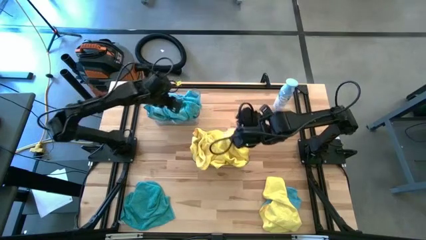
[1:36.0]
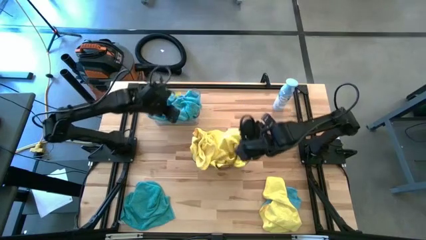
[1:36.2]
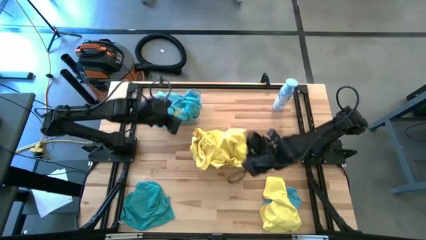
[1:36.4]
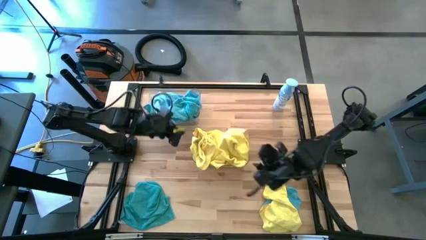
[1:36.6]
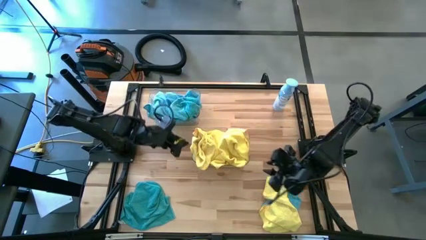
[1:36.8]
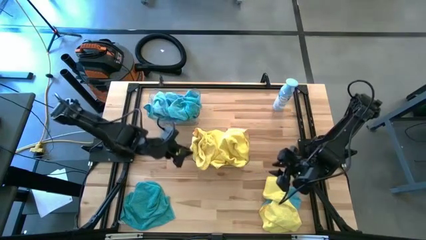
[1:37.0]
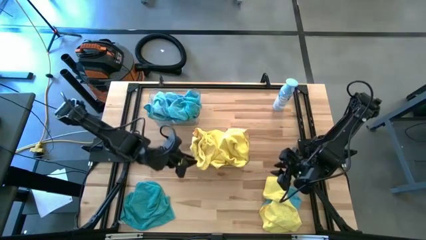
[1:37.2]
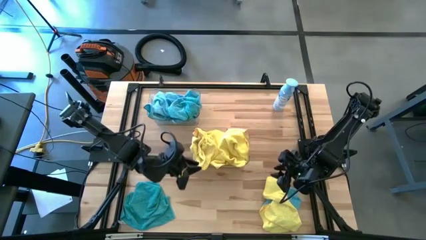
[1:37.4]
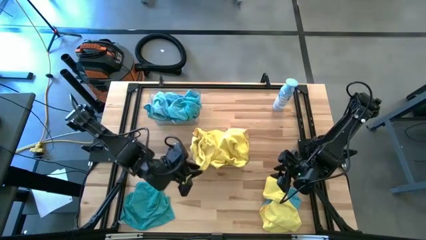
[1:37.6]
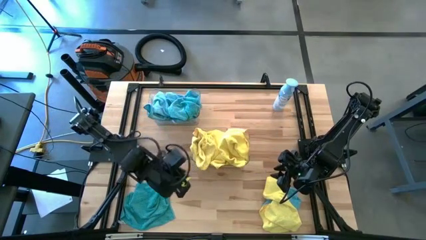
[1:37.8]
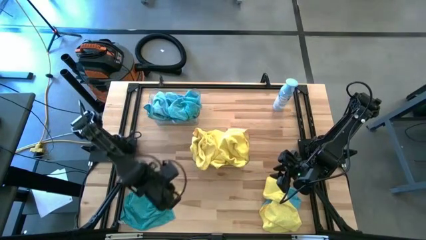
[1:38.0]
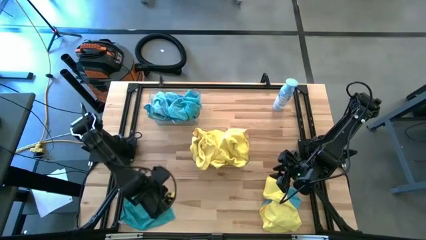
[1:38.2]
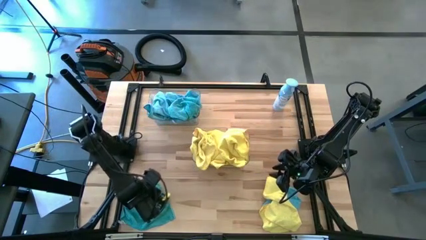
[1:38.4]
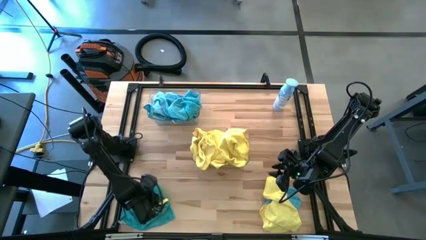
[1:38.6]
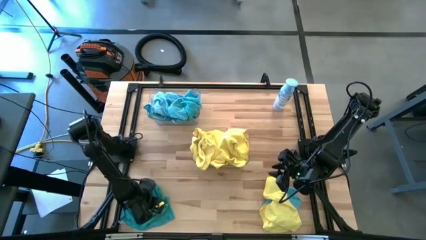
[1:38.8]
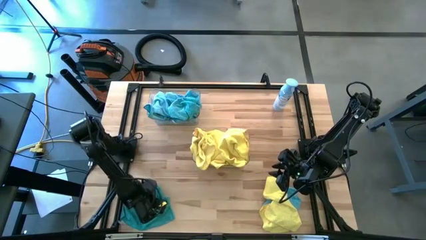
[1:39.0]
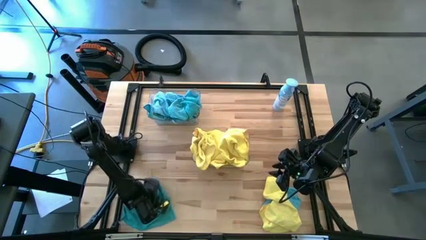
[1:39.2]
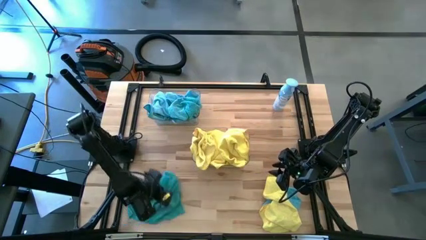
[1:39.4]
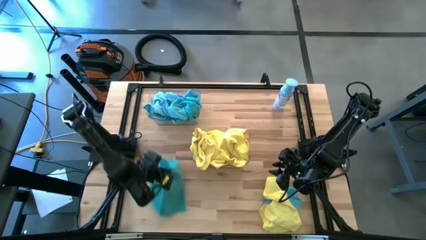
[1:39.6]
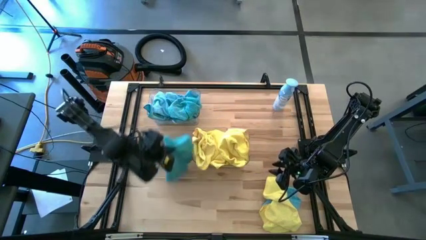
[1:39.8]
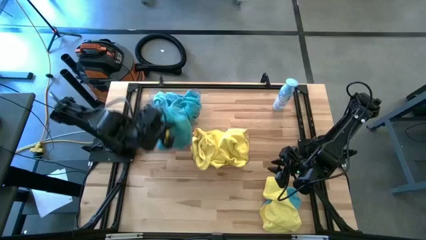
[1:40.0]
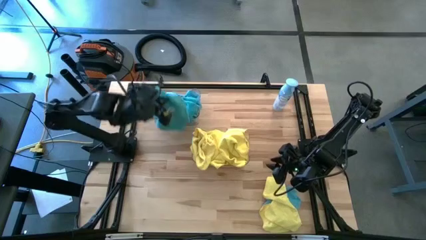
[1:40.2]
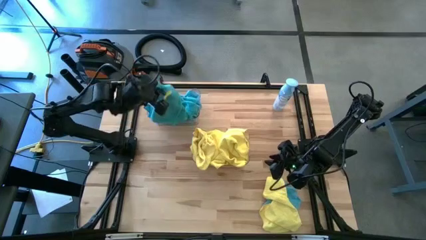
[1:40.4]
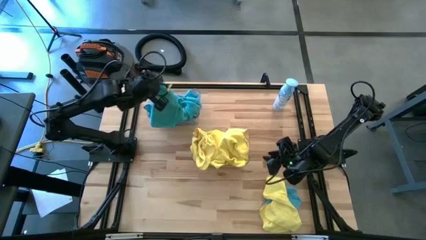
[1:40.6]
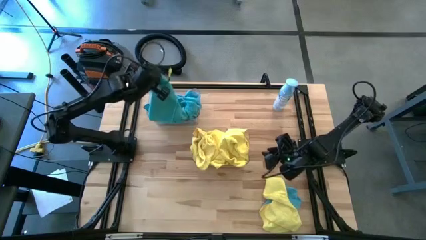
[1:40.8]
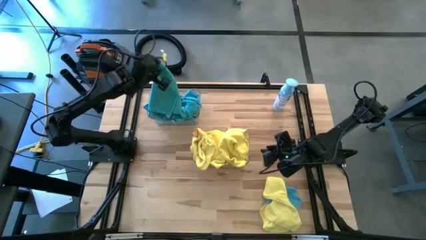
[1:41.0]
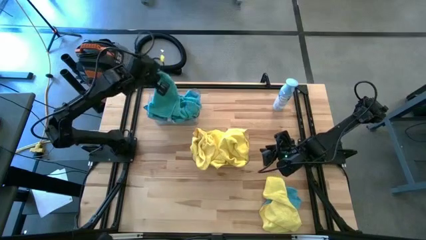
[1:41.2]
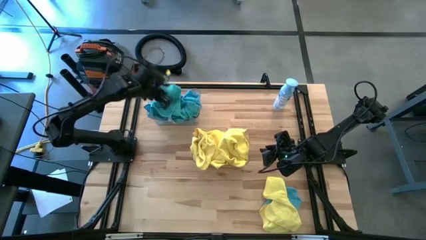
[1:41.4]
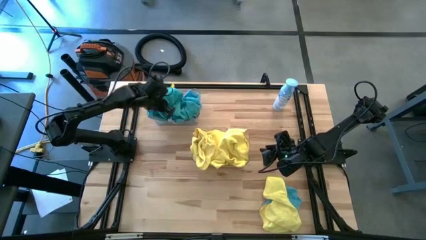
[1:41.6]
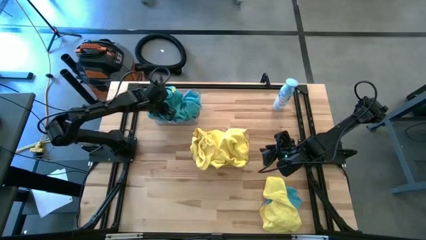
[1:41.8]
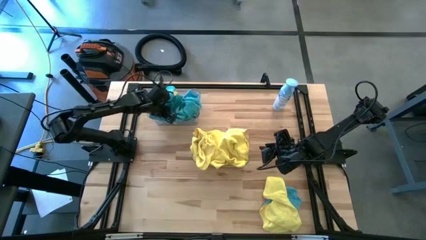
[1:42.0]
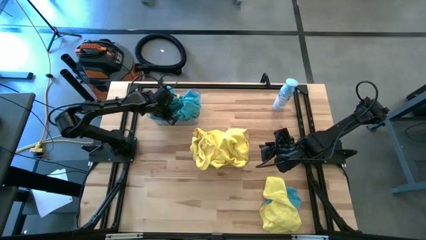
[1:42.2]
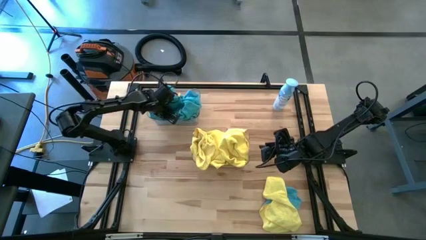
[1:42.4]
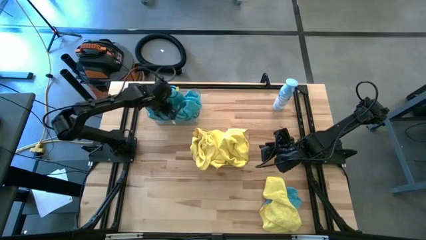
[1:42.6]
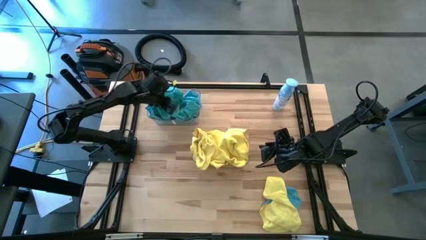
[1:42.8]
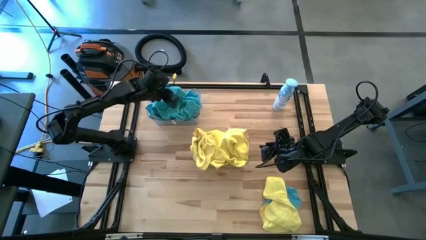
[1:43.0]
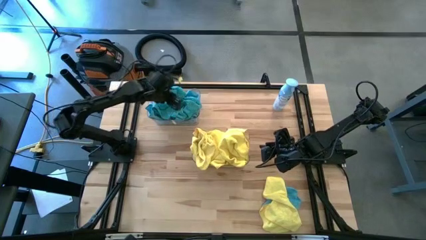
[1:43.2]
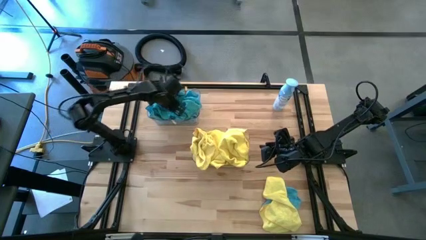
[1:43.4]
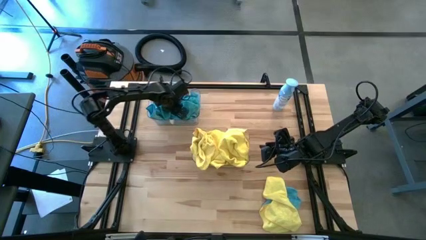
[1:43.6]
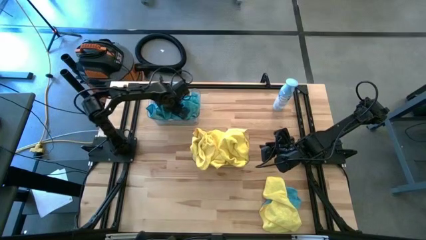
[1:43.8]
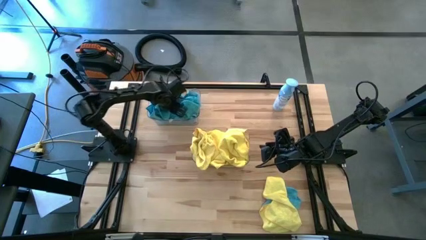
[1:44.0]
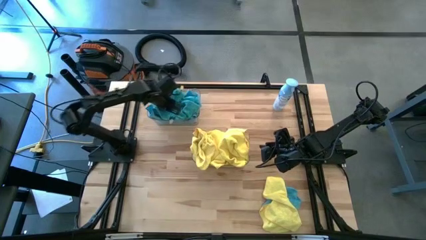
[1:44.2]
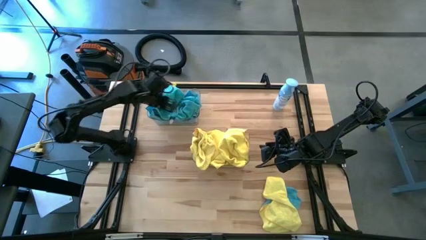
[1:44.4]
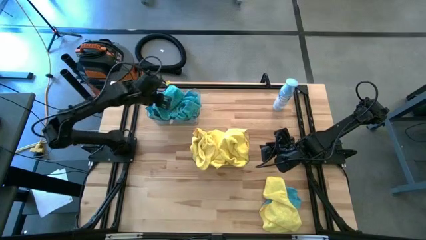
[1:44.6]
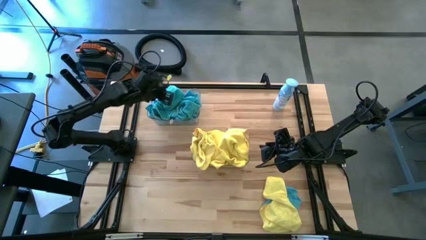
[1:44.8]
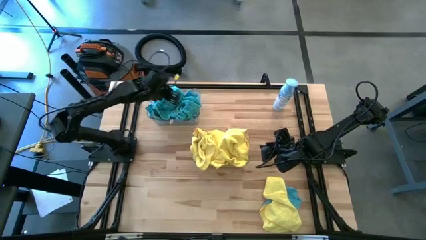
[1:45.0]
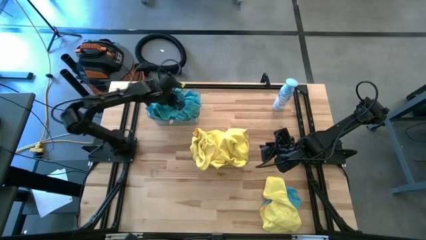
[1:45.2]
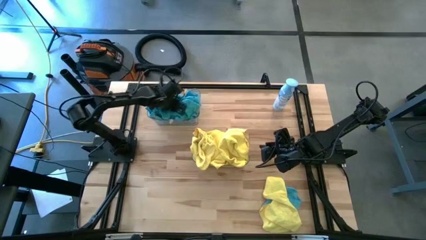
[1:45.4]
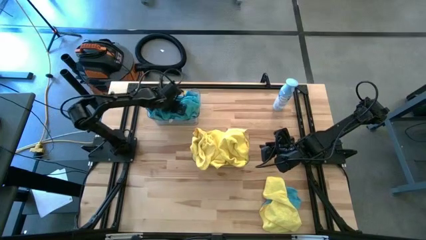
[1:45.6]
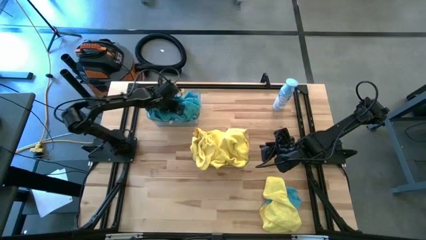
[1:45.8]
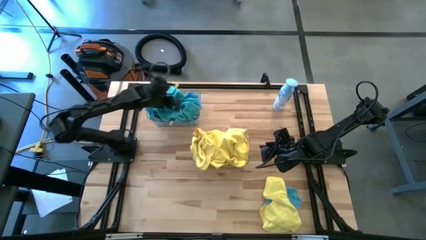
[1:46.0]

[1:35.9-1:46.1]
Task: Sort microfiber towel by color & place in baskets
Put the blue towel into the top transparent bin

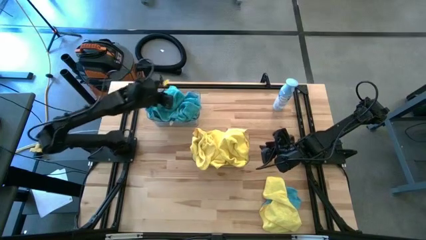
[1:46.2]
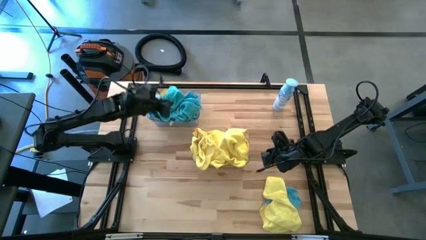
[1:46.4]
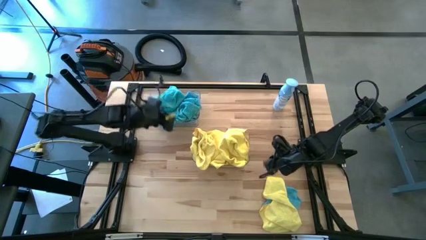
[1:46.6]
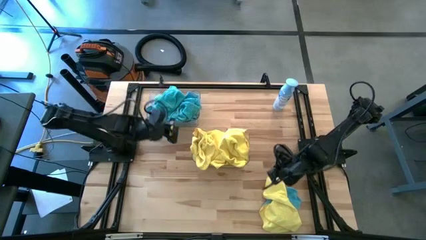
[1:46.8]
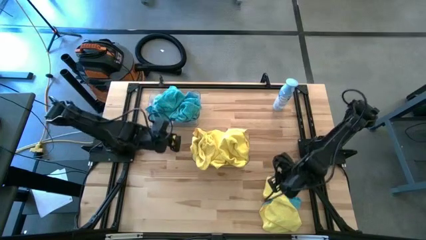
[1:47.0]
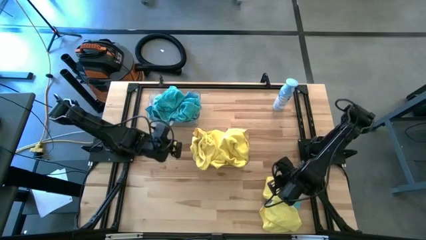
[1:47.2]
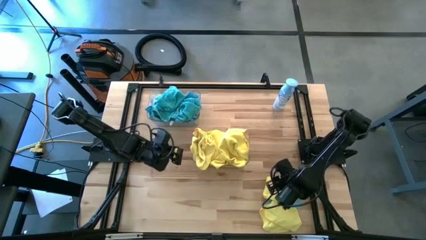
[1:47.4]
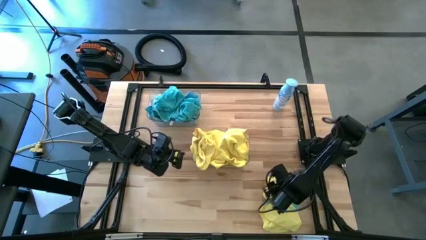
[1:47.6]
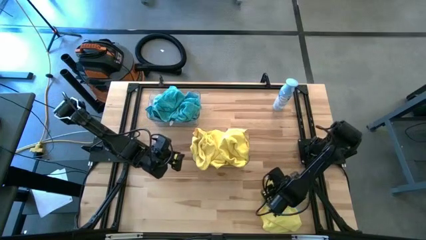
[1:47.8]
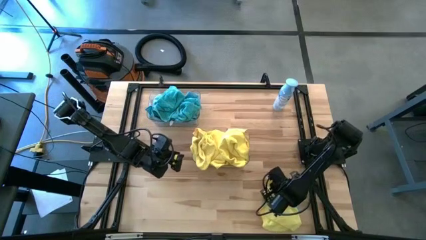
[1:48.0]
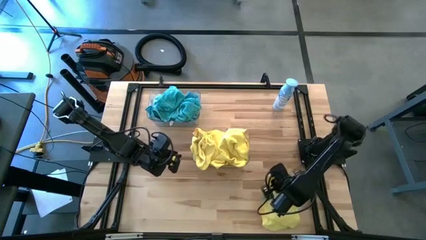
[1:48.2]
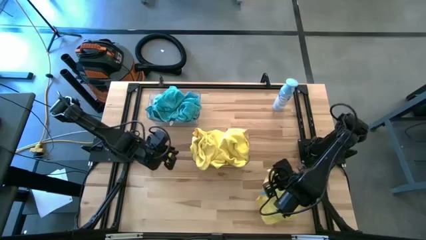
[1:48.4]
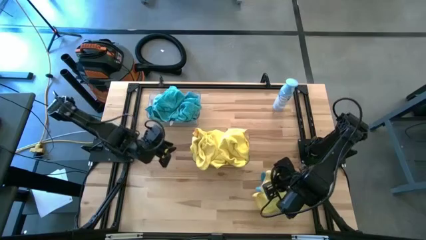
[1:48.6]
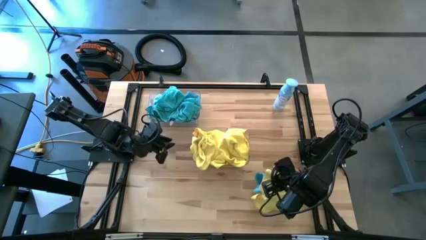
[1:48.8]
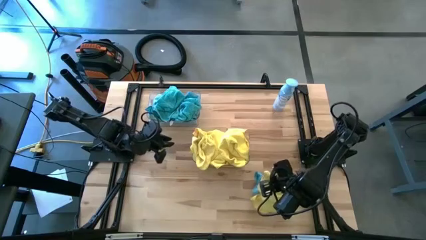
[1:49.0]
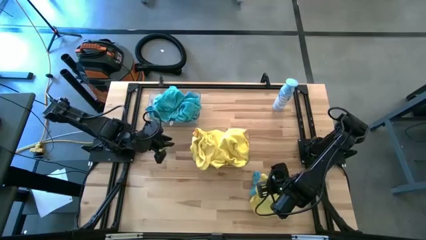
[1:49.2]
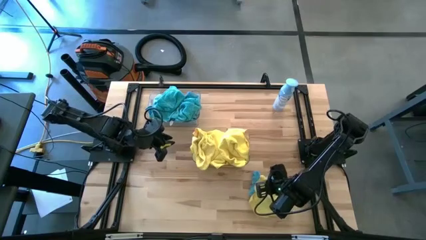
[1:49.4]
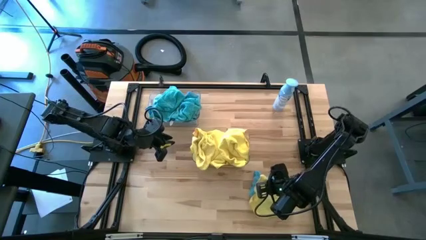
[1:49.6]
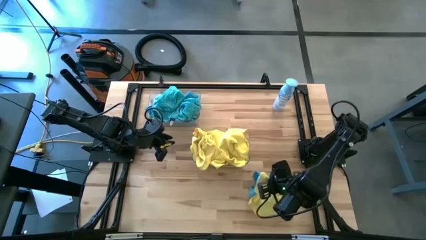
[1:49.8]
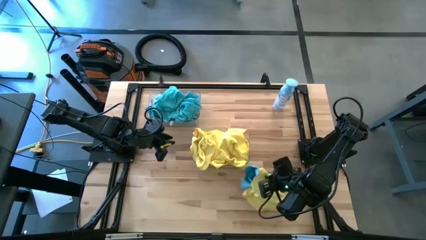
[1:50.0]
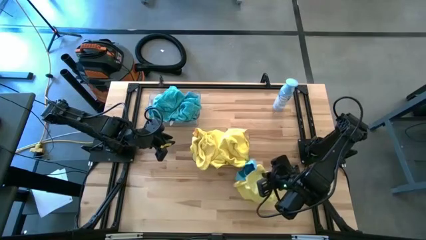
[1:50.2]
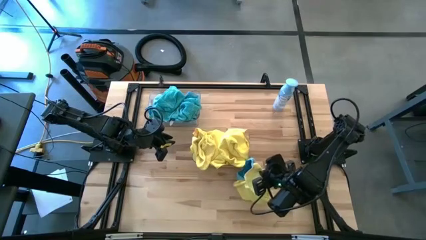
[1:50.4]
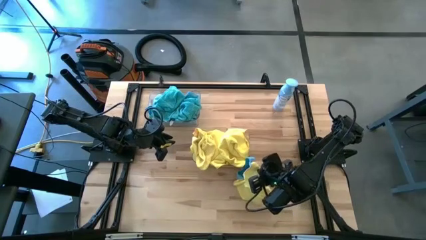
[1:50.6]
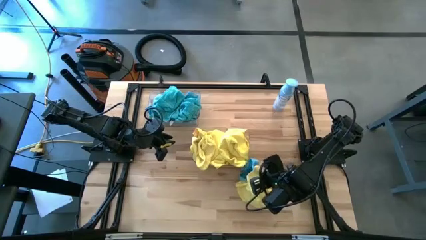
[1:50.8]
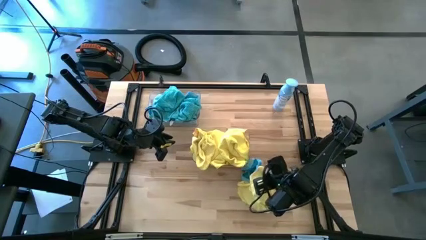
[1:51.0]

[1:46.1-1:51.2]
Put the yellow towel into the bottom transparent bin
